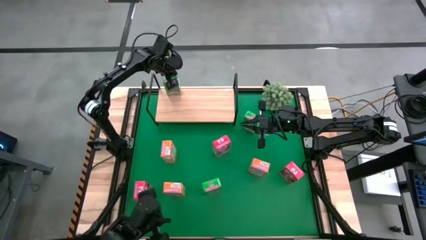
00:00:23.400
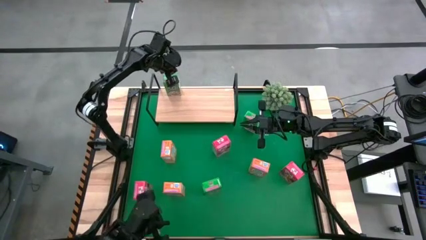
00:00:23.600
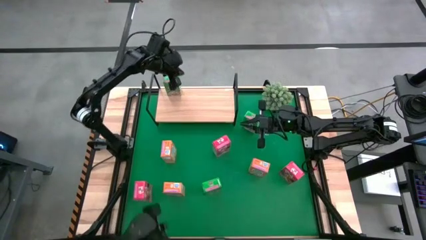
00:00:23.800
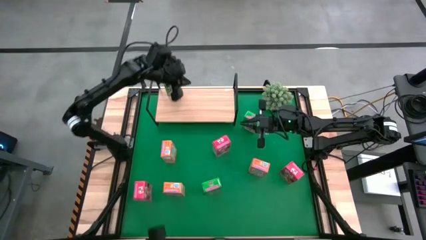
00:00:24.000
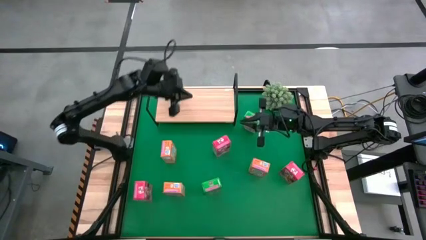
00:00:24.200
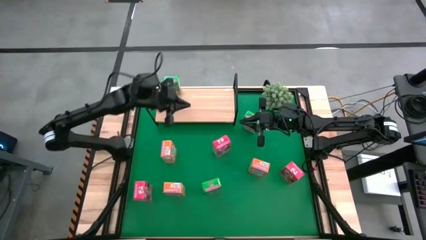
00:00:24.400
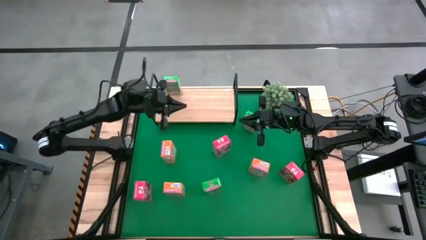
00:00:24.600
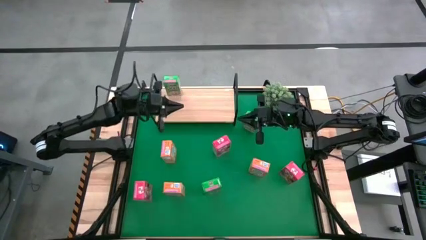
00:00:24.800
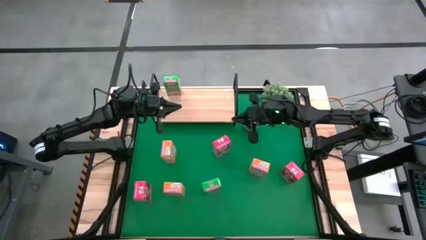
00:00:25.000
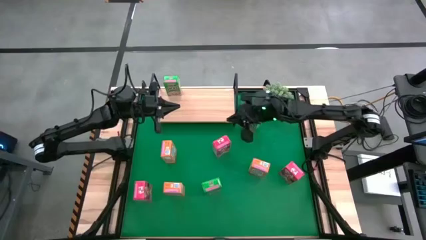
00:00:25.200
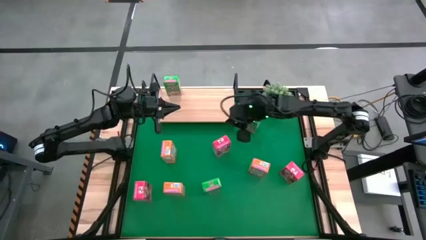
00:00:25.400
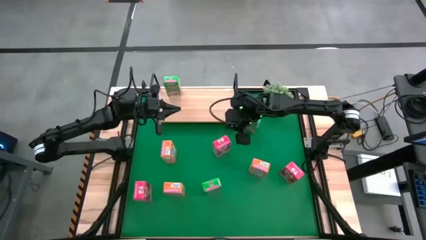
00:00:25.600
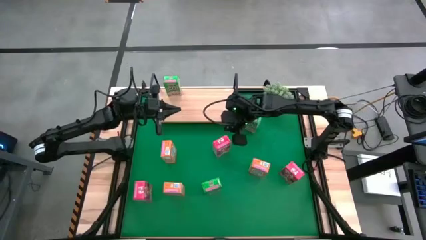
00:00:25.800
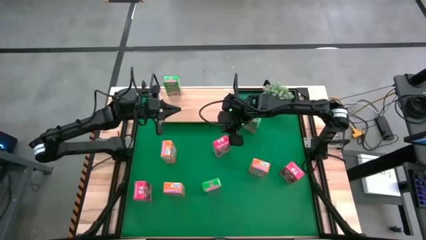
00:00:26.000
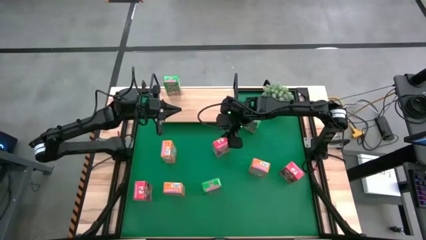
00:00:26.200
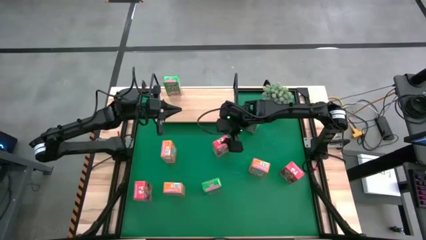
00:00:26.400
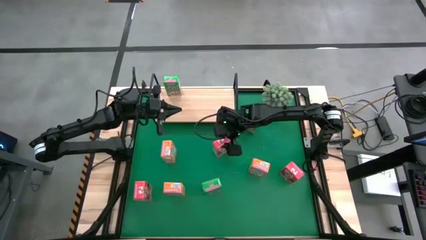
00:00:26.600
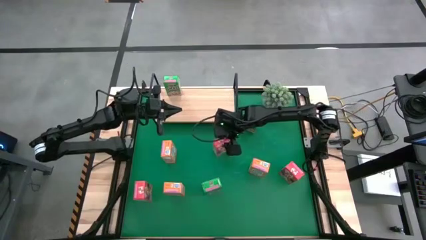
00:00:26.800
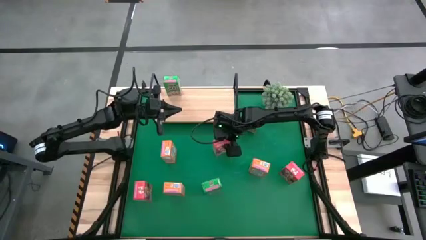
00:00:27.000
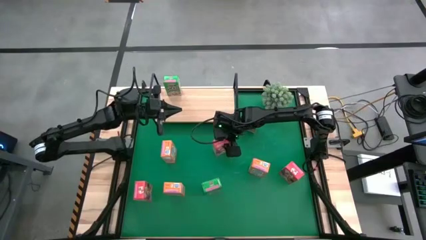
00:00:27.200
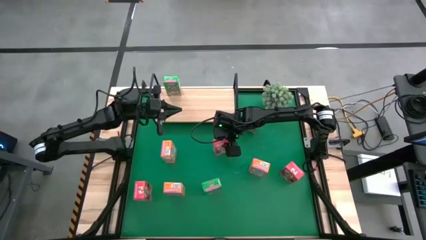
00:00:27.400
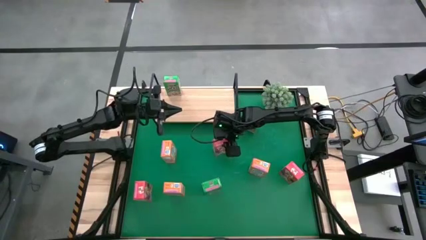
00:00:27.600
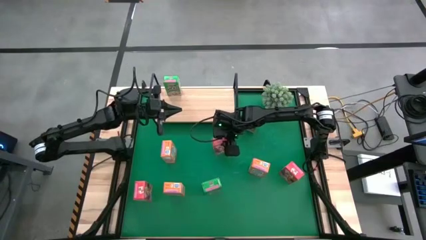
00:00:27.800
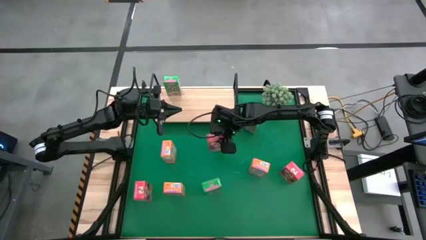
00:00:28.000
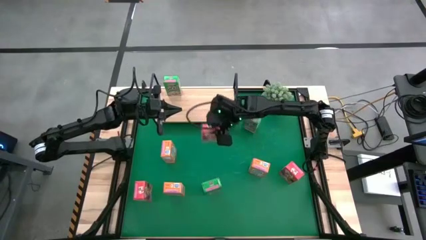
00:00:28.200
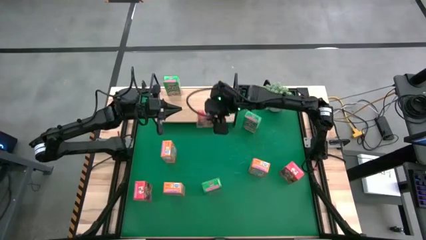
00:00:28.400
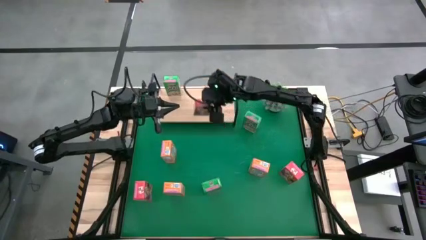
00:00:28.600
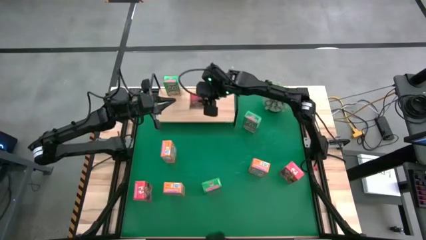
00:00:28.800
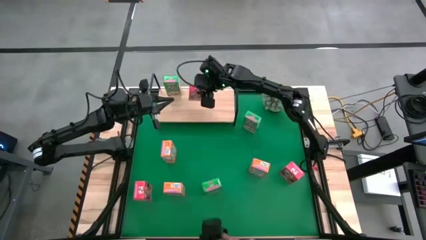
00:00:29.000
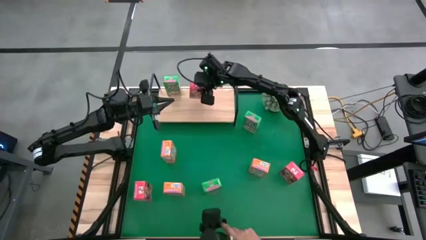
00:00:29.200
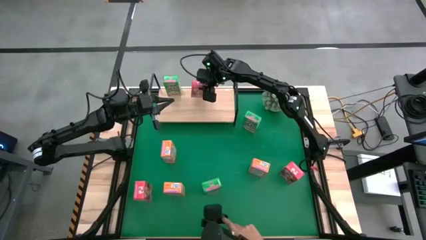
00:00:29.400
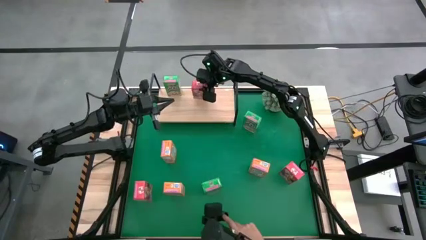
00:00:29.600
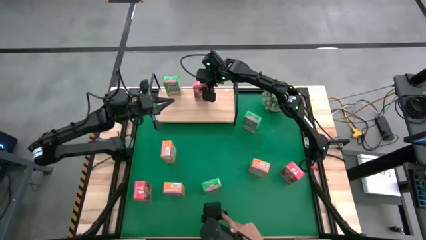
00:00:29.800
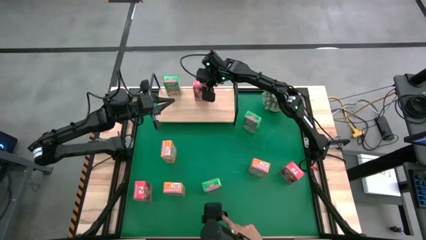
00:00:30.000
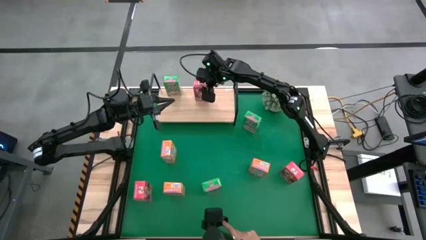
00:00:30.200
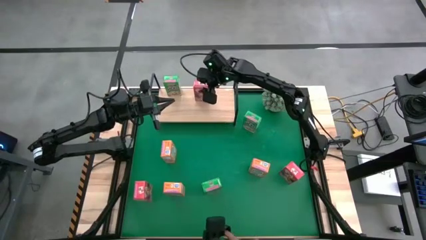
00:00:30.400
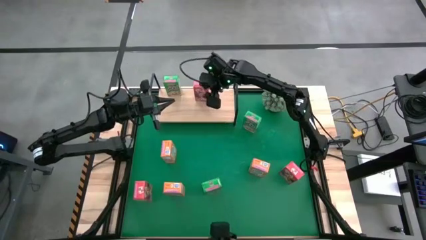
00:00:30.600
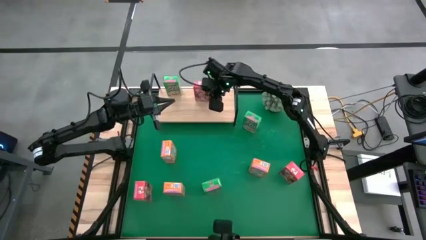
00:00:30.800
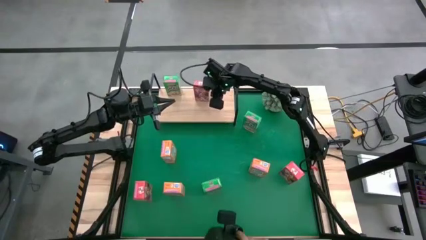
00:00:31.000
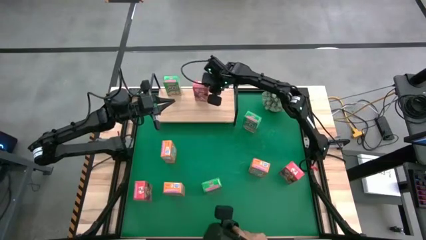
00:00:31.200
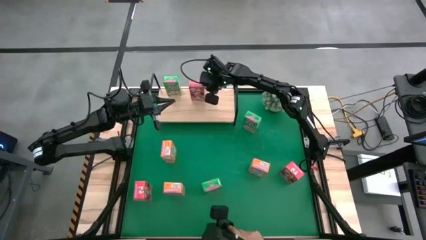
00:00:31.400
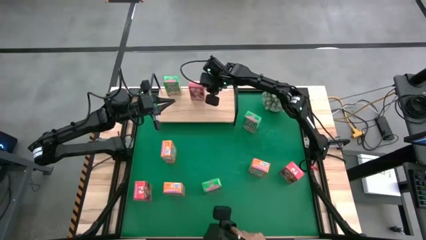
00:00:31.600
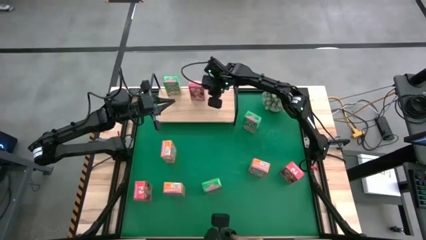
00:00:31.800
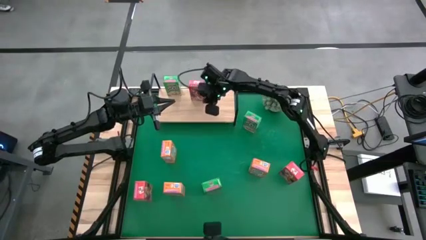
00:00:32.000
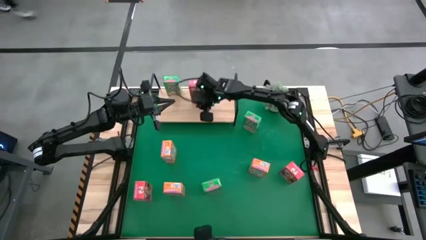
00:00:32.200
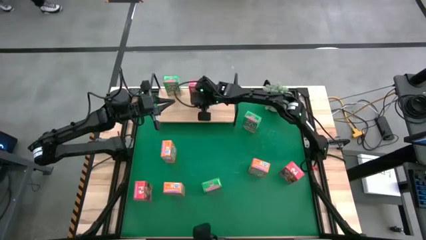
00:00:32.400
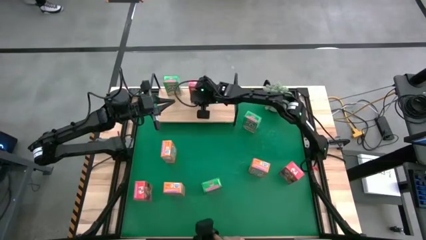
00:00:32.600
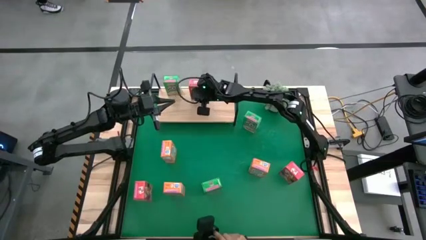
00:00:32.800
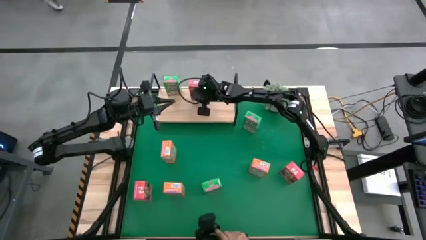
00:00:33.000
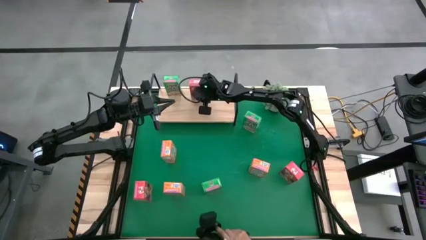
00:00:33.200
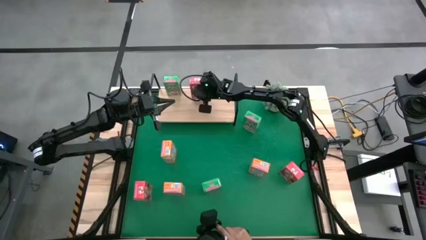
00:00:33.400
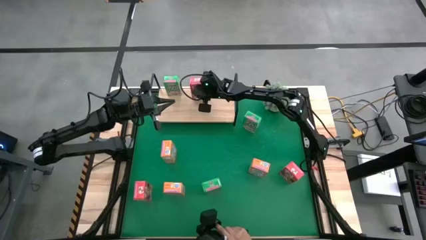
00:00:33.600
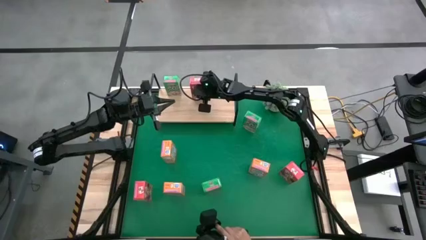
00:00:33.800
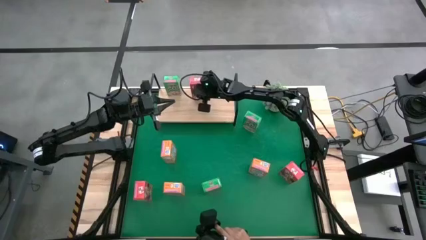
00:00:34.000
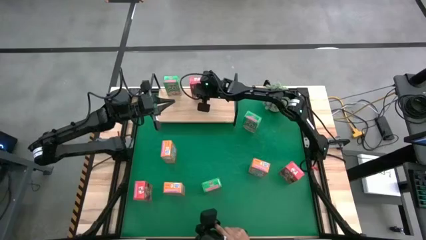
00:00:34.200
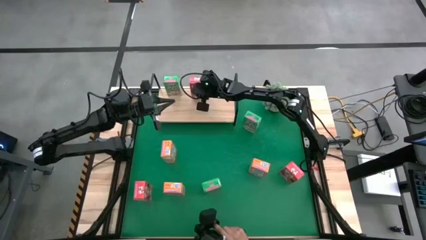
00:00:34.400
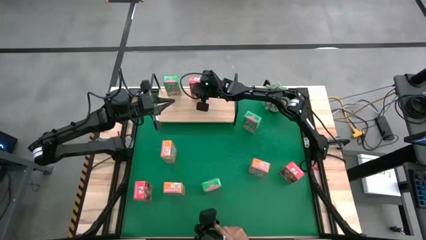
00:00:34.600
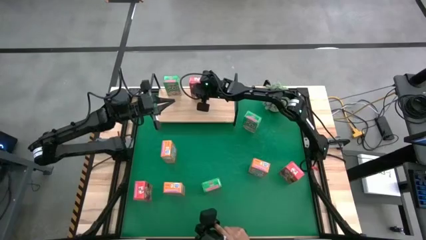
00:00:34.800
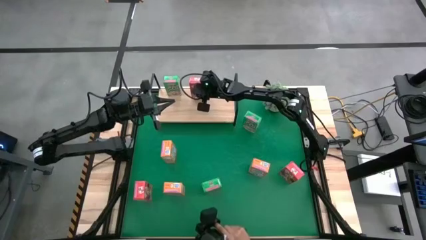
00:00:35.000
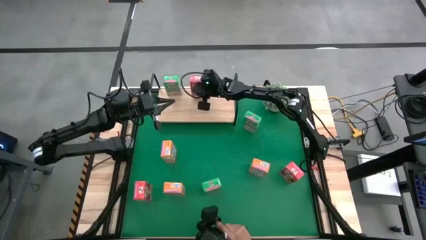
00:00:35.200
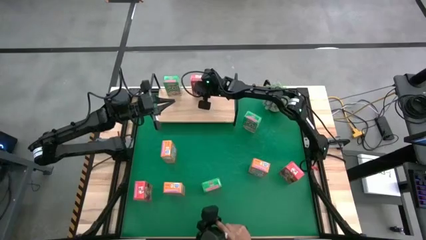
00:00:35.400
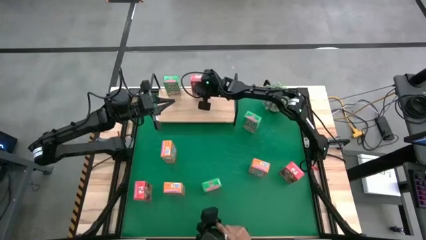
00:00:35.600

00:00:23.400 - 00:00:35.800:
Task: Stack cereal on shelf
Put the top red cereal box on the shelf

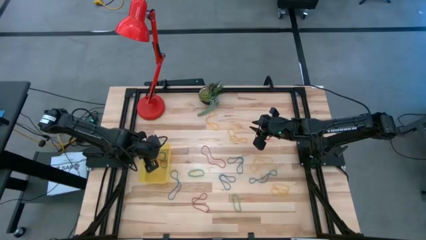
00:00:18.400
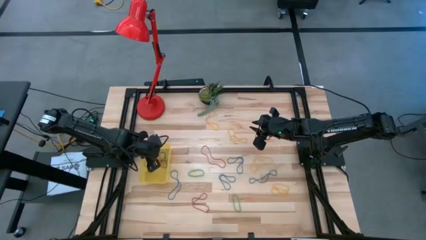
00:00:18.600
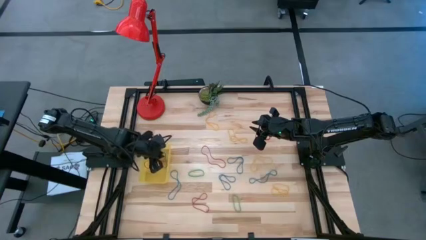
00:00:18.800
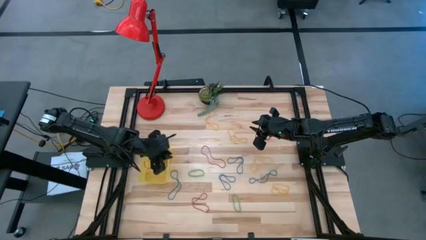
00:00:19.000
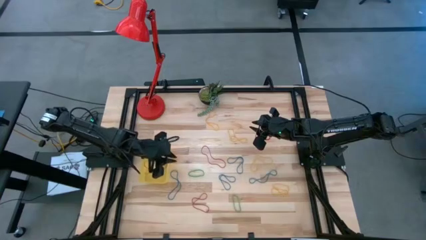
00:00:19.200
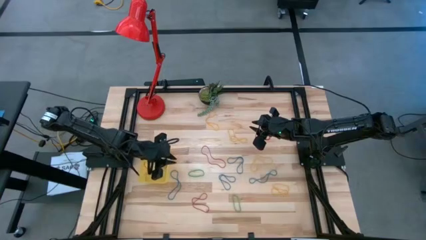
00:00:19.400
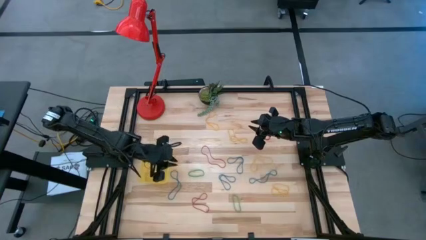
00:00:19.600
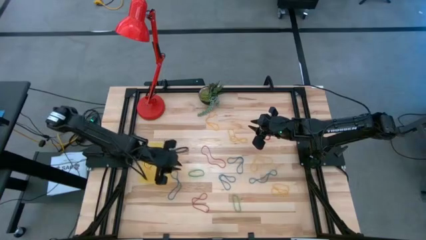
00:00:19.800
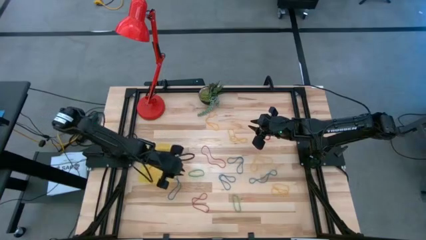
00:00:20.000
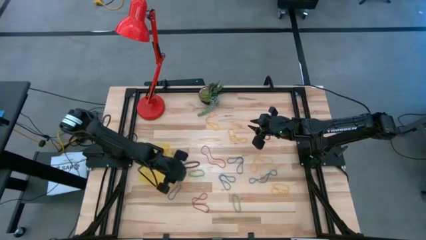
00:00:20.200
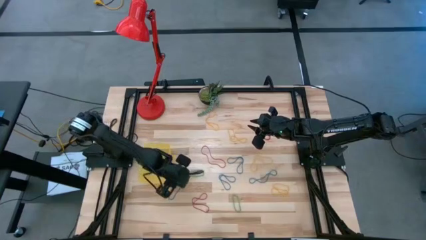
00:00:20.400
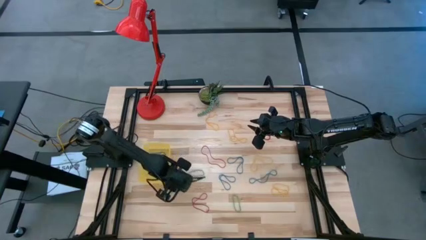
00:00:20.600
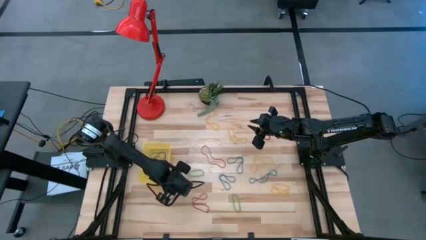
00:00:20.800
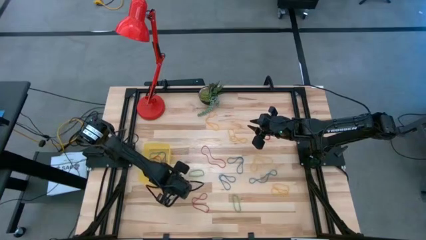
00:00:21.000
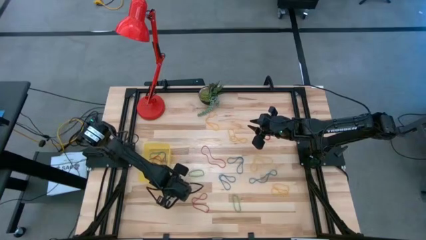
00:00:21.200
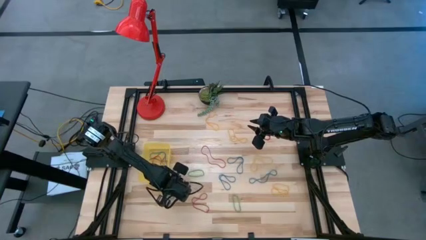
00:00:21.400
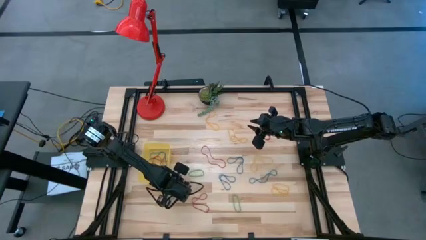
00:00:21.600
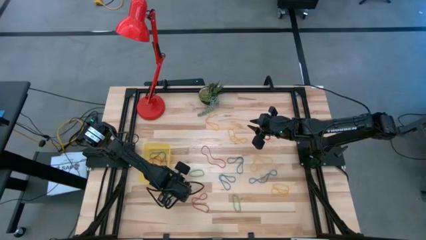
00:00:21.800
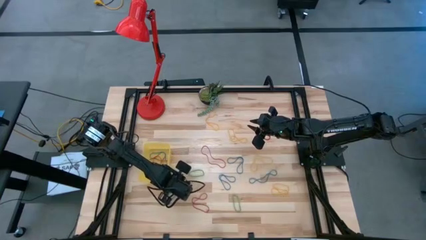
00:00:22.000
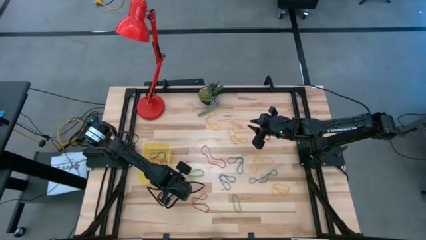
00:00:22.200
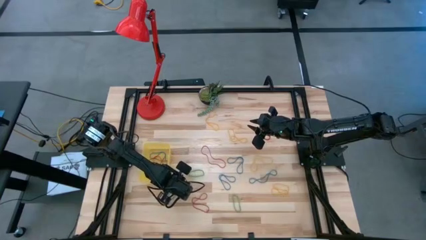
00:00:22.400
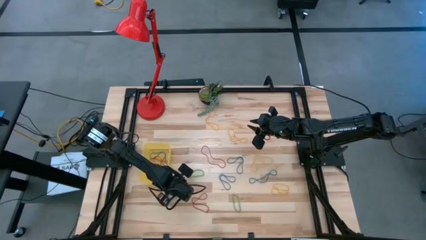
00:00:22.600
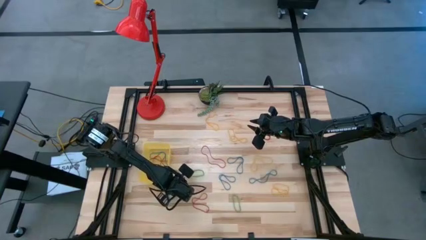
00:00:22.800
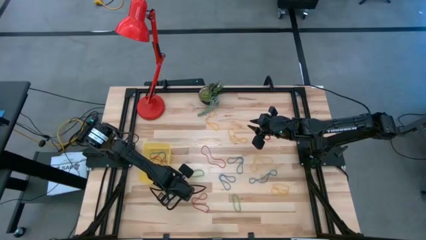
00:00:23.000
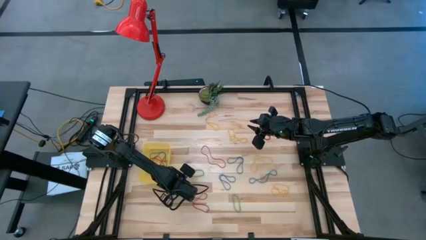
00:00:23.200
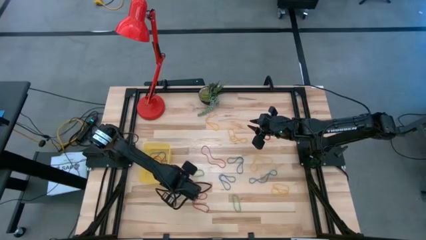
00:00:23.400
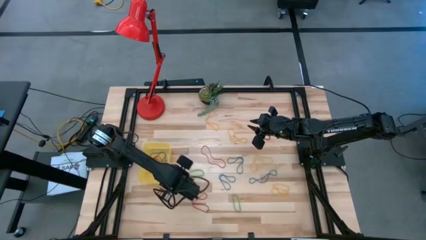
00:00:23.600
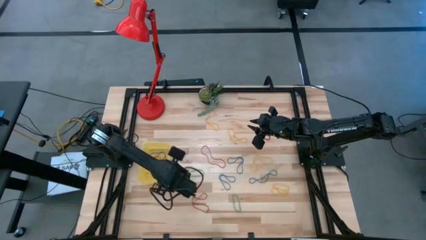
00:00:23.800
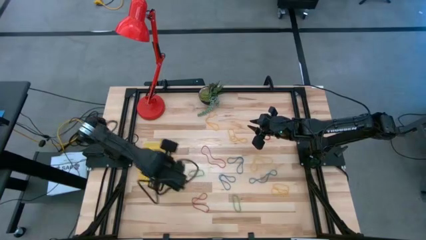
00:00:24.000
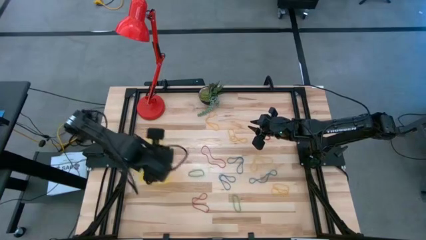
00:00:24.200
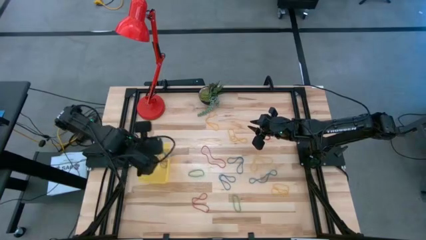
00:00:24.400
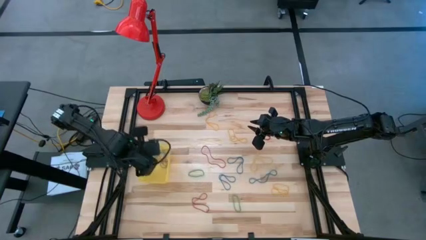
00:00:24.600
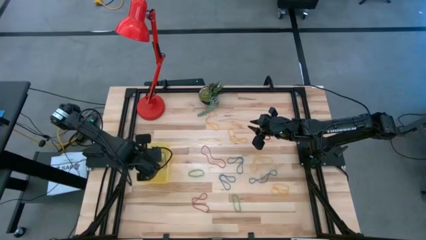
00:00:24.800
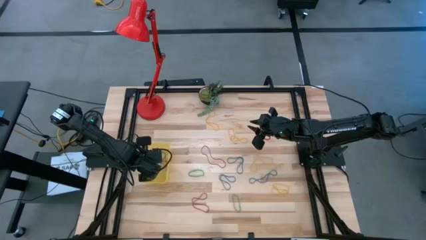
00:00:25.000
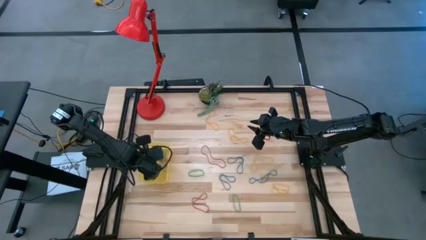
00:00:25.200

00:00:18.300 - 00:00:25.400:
Task: Pick and place items into bin
Put the blue rubber band into the yellow bin
